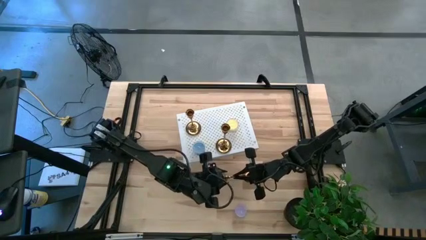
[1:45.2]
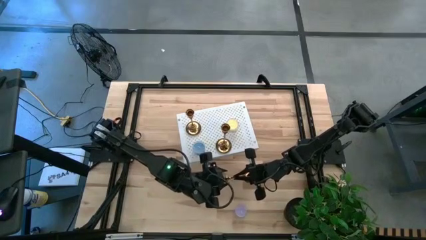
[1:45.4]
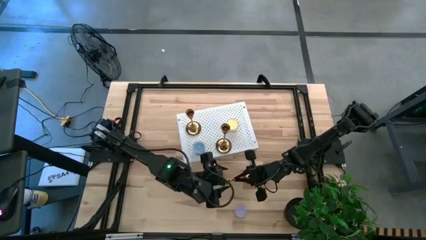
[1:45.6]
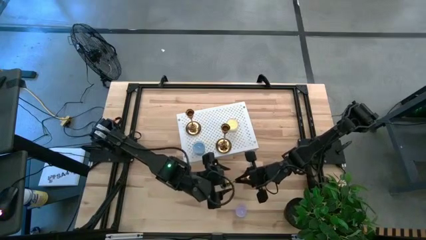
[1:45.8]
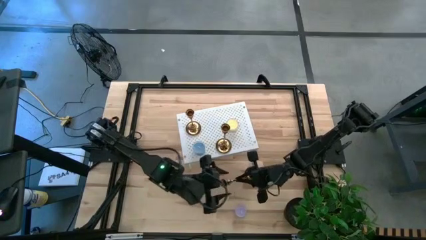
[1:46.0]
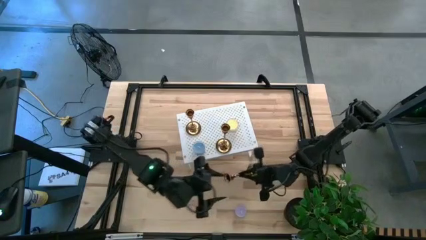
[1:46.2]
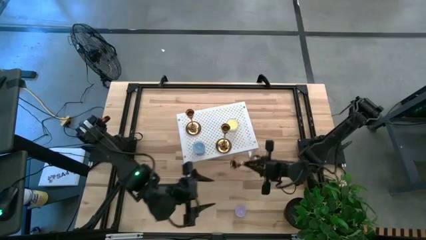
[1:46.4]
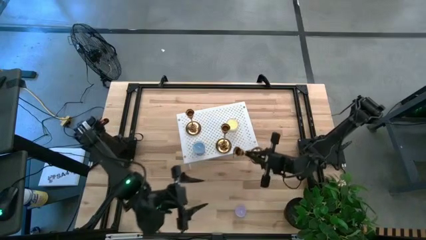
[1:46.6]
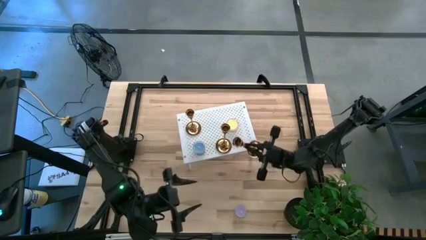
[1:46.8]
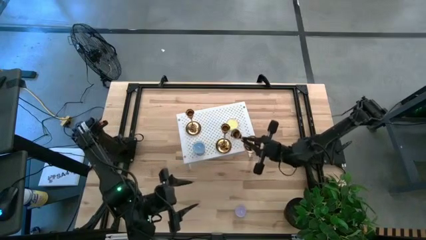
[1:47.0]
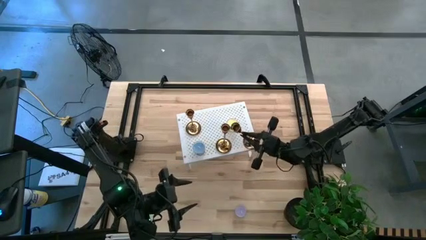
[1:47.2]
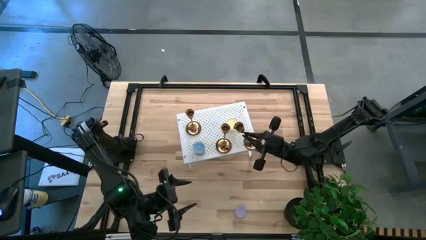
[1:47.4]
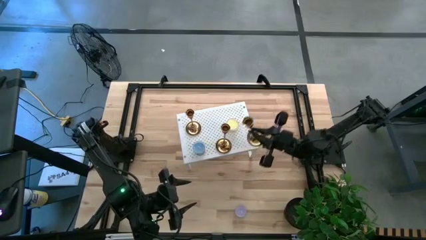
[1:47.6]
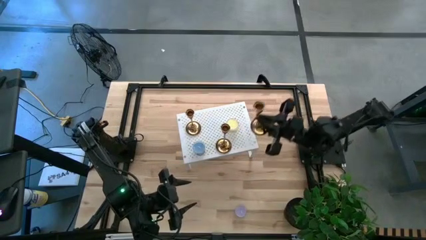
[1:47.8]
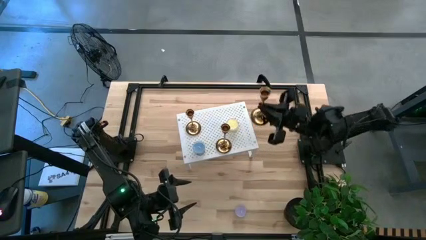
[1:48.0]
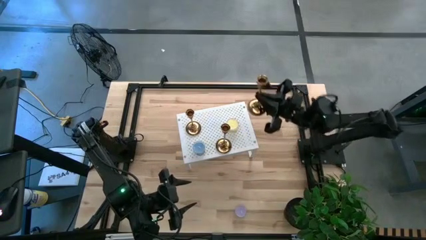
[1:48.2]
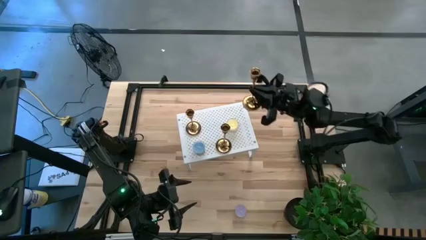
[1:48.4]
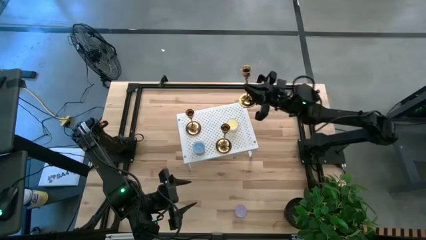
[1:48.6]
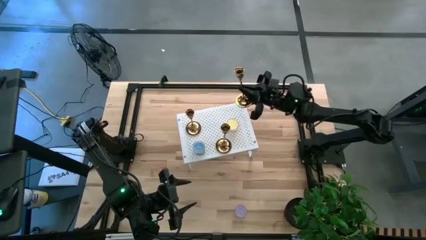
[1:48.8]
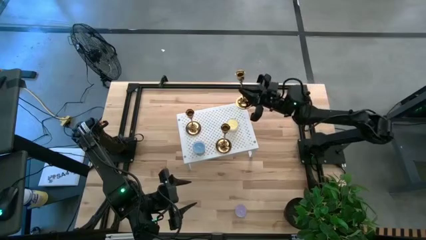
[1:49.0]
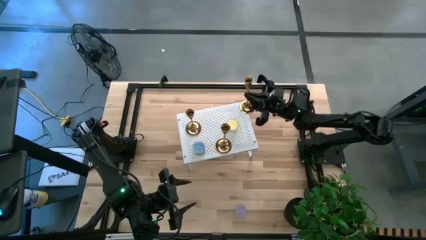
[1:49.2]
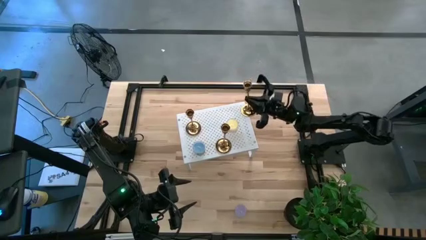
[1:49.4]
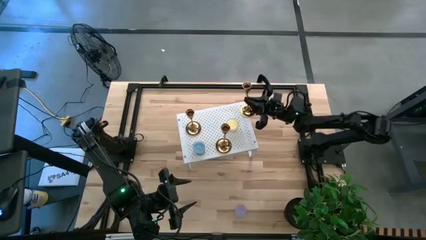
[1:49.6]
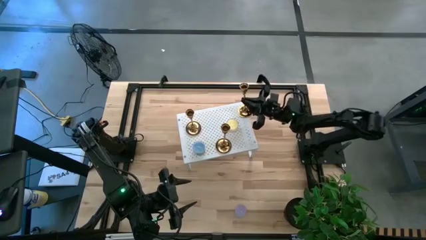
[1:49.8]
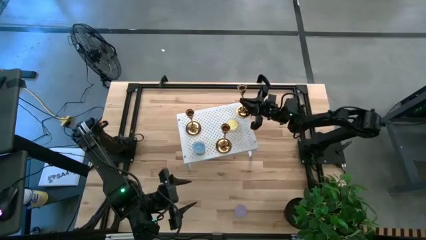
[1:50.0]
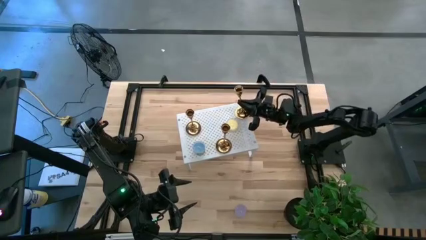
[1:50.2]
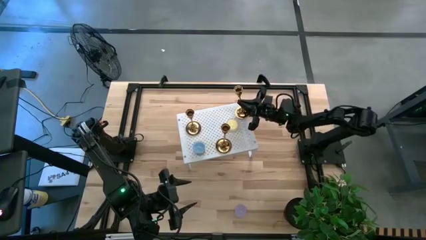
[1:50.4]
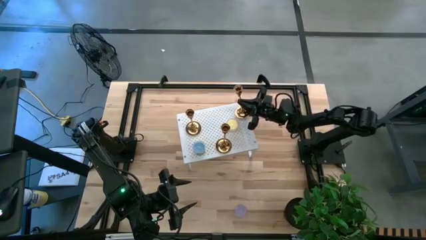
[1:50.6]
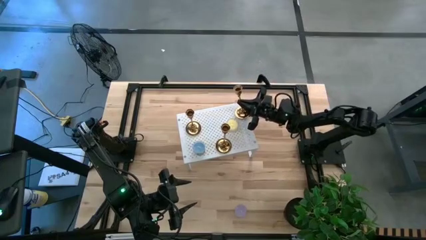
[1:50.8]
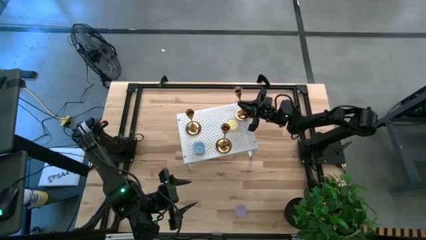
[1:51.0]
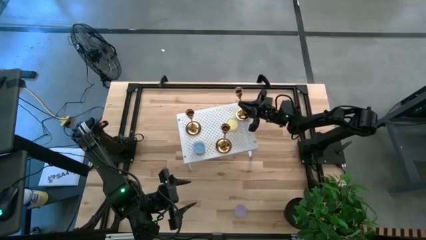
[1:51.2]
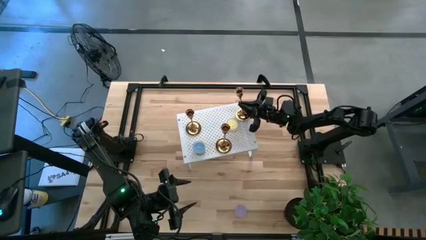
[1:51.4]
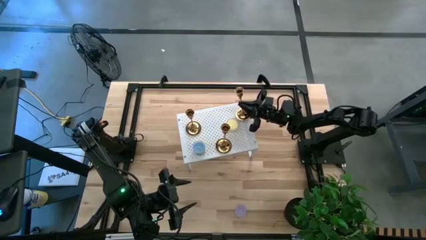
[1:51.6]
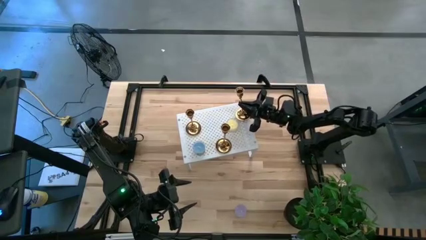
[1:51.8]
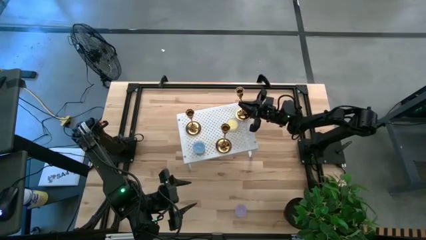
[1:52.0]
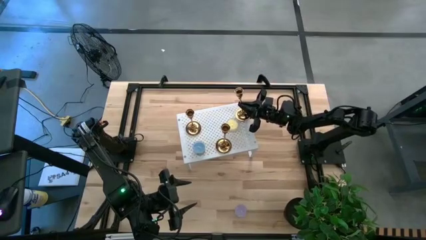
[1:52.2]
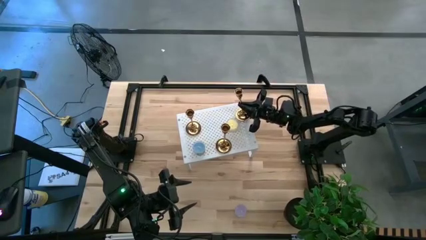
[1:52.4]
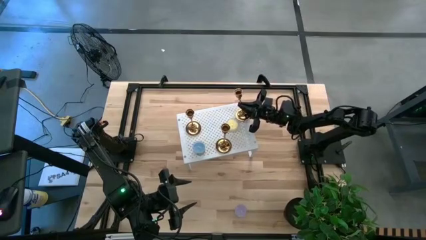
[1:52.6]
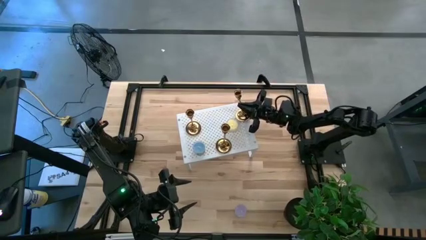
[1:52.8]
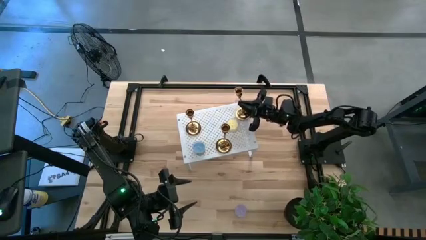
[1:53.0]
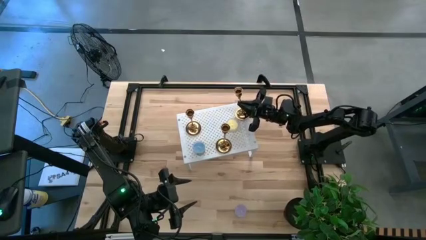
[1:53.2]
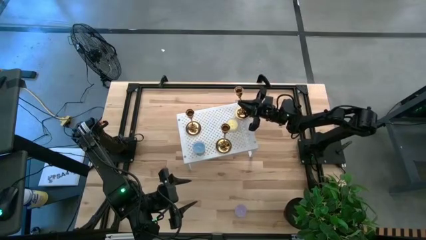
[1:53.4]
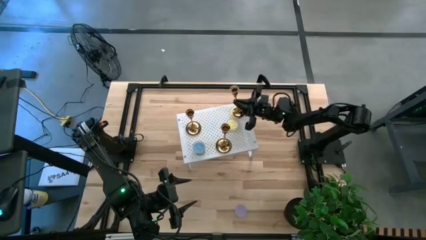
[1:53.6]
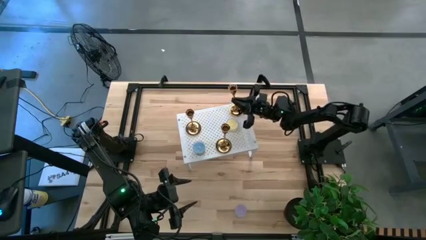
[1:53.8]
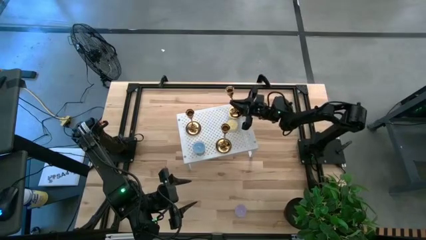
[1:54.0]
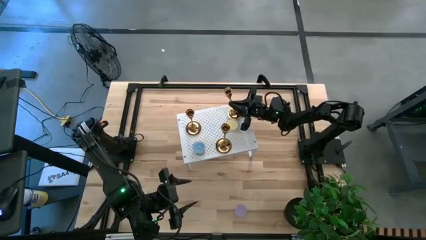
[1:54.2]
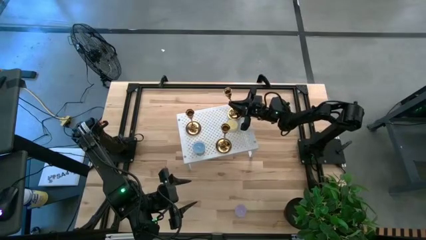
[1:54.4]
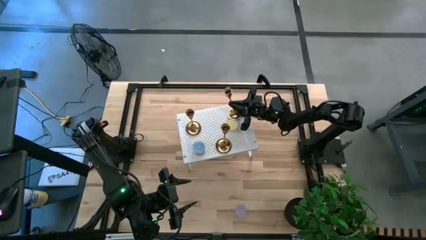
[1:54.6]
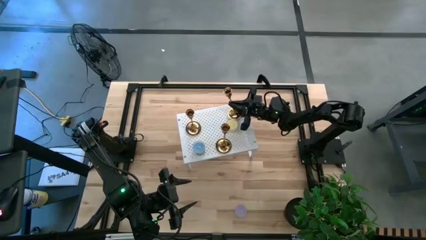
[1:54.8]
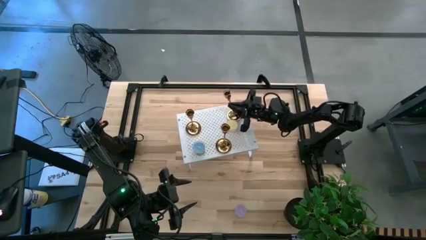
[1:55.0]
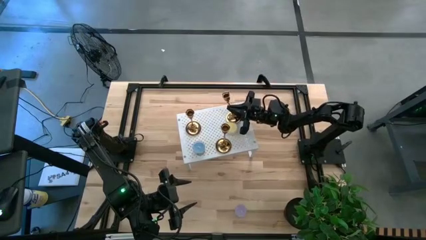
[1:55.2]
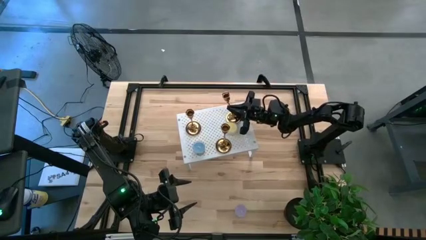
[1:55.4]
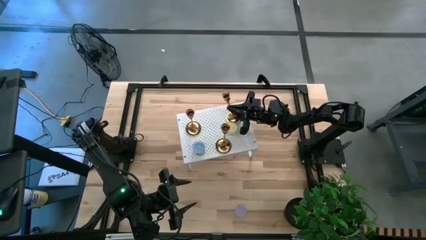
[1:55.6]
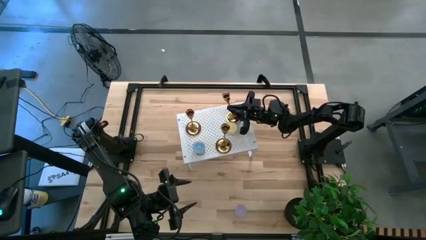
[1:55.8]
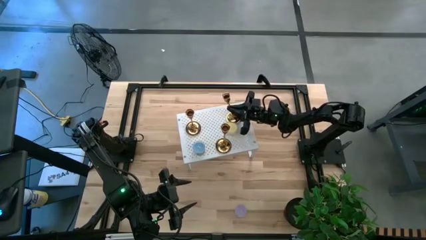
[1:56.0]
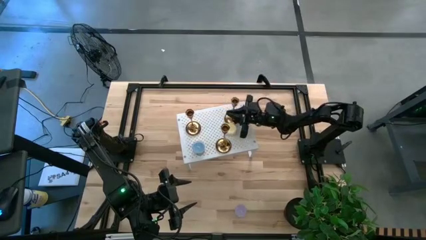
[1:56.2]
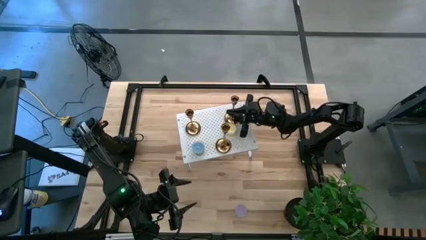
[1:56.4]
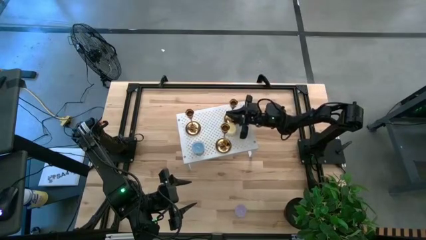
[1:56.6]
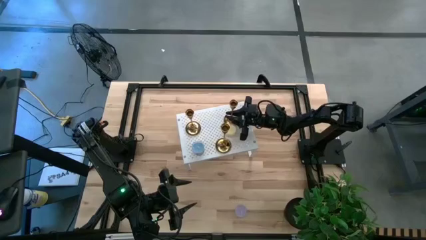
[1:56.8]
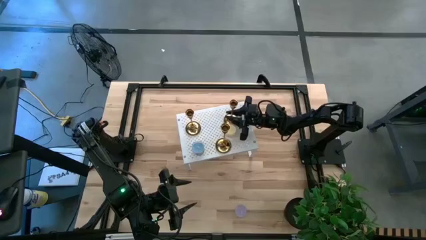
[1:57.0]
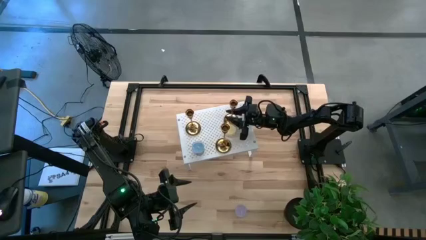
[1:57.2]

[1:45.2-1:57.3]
Task: Pick & Place candle stick holders
Put the yellow candle holder on the shelf
